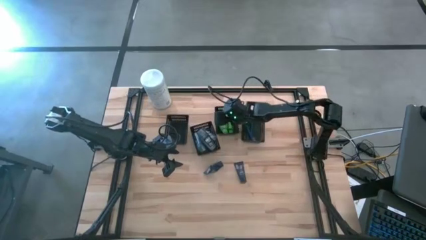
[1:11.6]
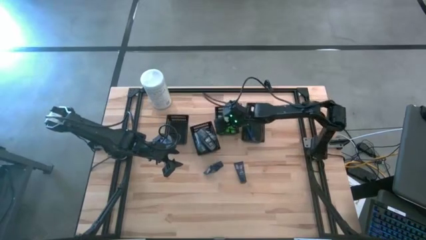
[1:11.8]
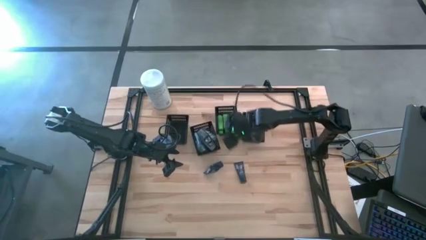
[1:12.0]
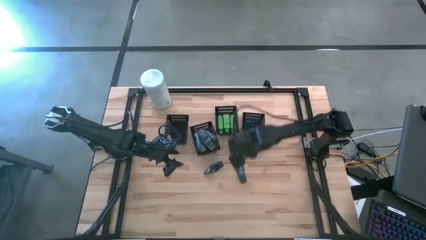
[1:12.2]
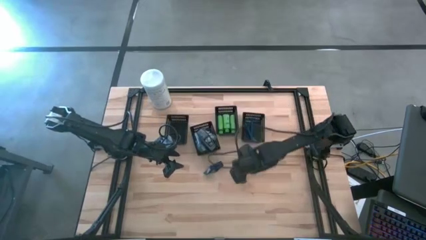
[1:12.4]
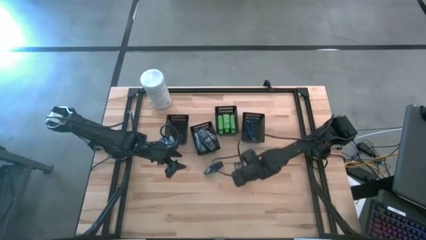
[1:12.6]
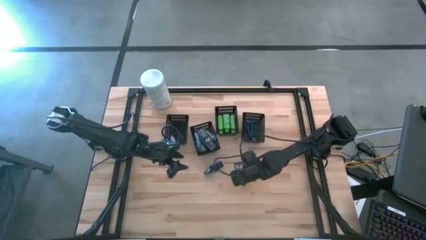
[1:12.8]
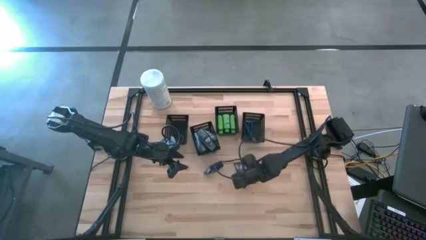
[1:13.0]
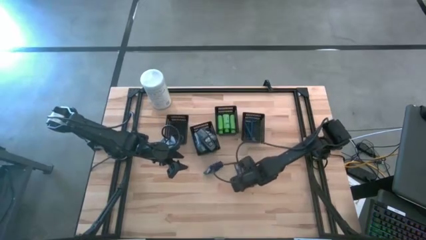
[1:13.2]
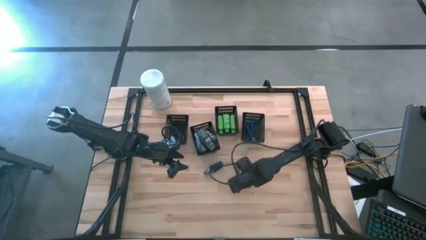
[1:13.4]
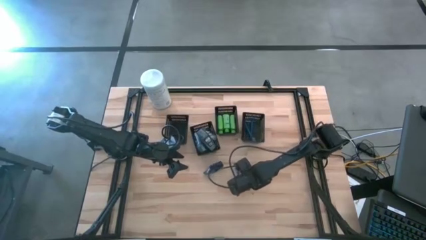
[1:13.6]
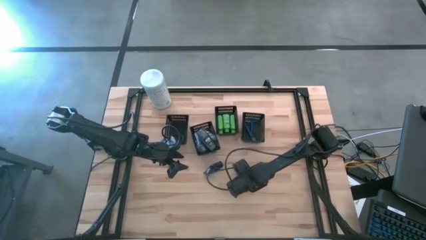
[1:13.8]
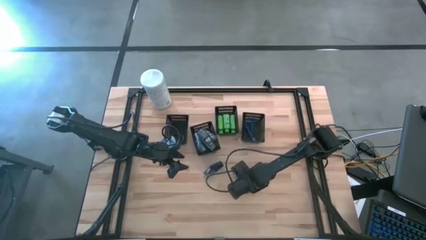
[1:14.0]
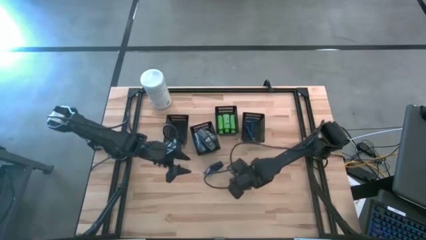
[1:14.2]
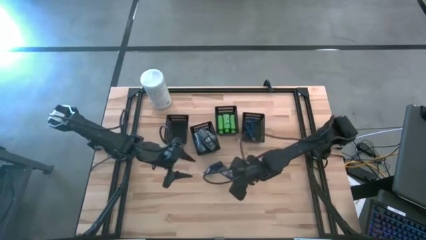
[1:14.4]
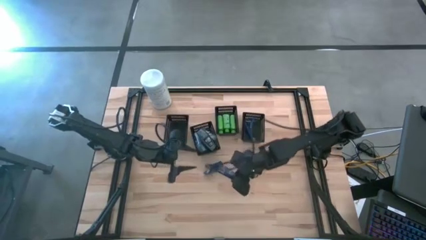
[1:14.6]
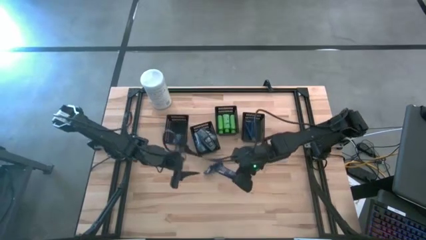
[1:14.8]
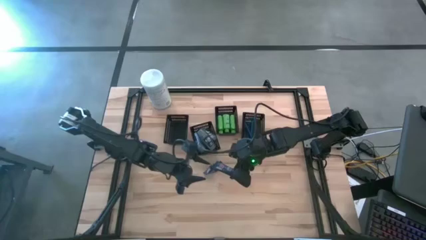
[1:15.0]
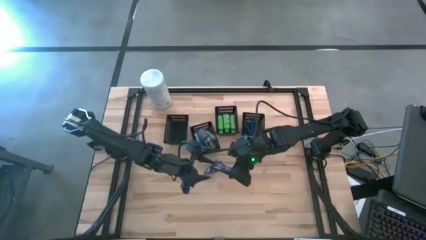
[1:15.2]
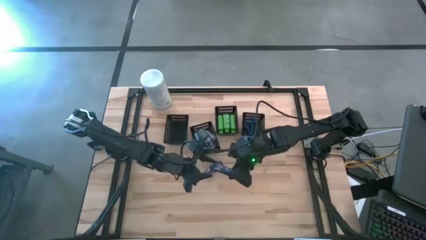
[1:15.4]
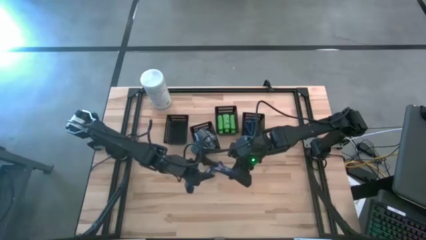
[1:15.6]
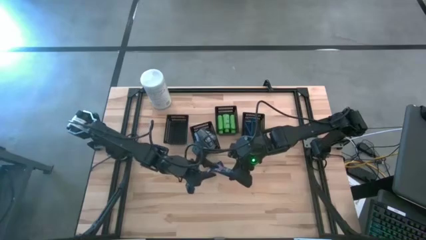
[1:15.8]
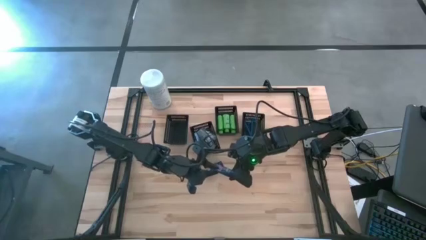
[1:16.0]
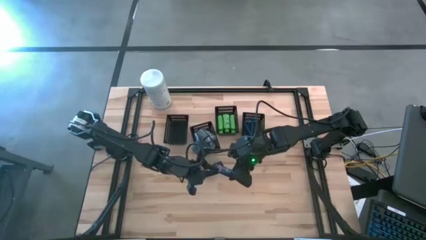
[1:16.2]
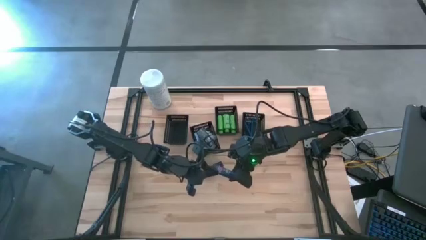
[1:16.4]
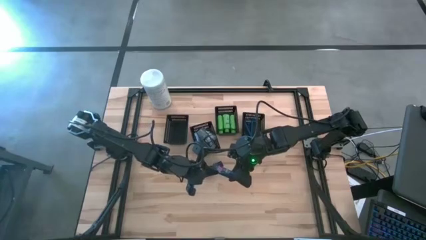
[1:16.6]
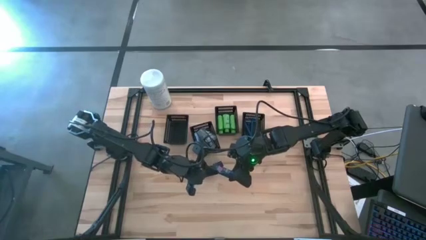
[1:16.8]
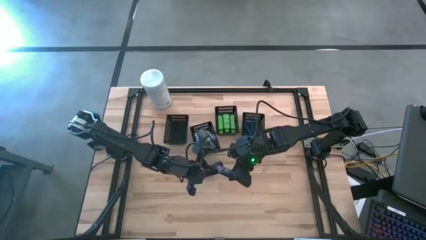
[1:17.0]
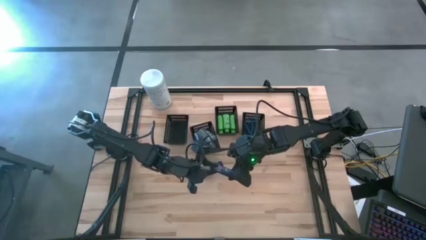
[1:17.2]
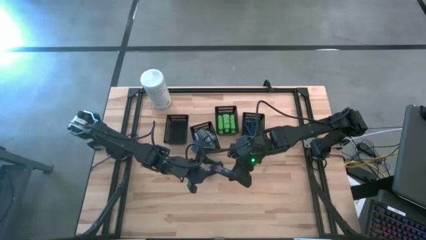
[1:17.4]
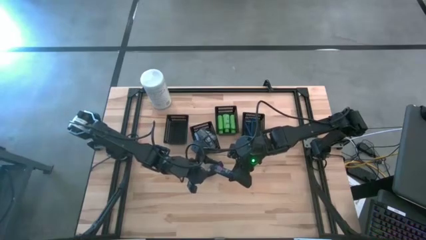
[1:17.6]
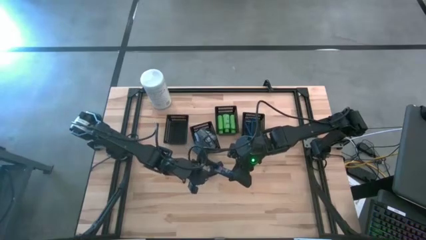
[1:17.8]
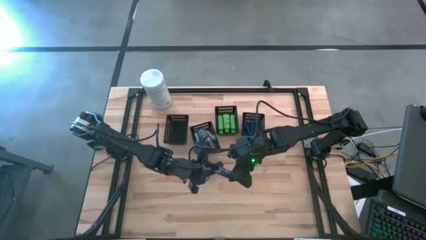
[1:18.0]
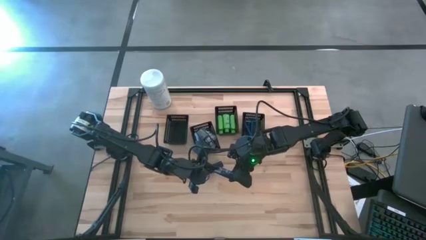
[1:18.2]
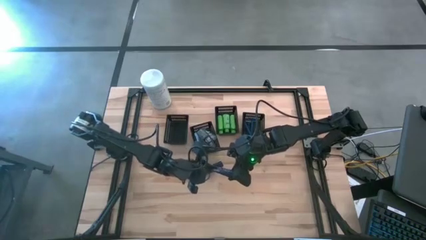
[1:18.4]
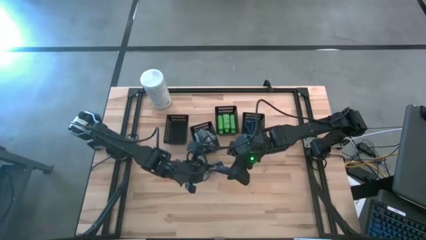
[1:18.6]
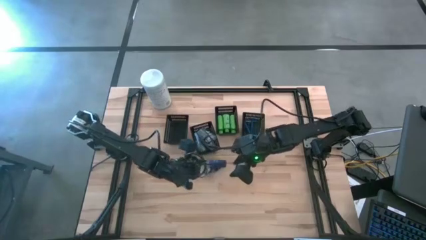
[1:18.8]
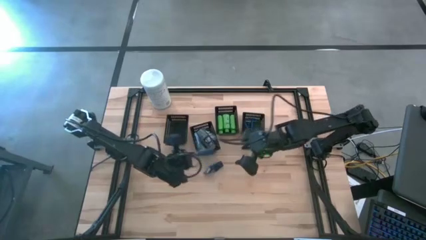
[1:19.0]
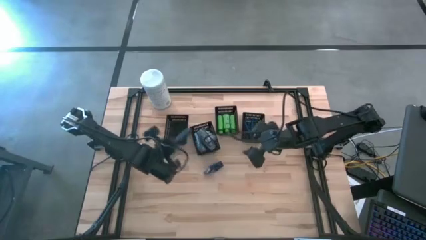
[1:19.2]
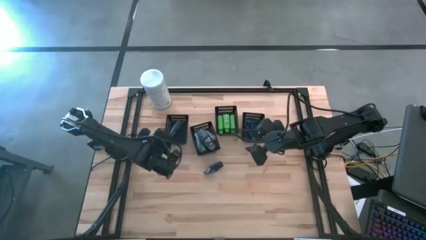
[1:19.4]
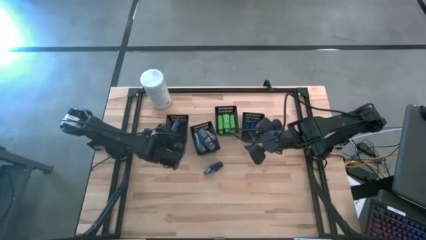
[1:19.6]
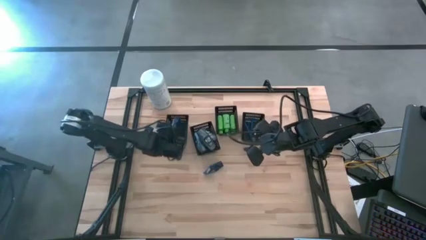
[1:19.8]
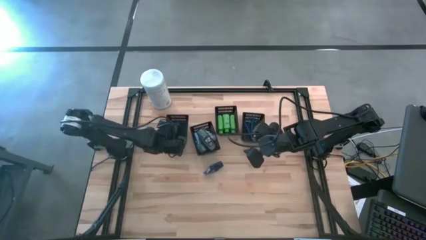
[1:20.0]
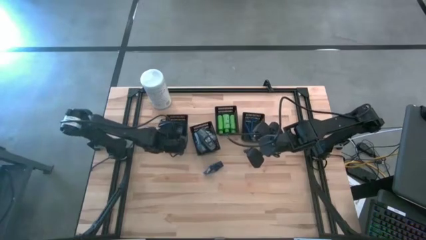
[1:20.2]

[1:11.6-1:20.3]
Task: Pick & Place Travel size toiletries
Put the right shaving cream into the far left bin

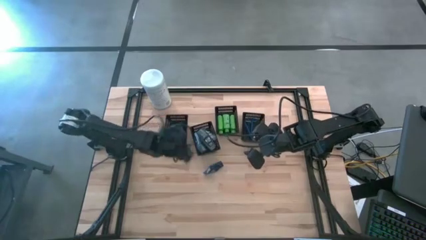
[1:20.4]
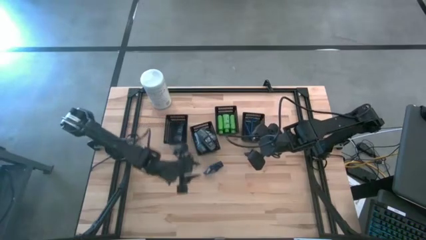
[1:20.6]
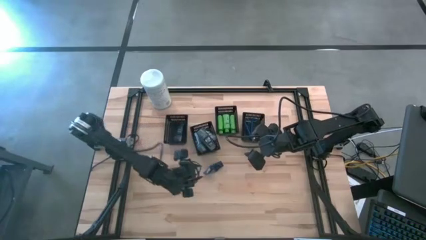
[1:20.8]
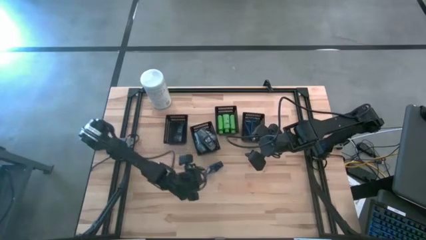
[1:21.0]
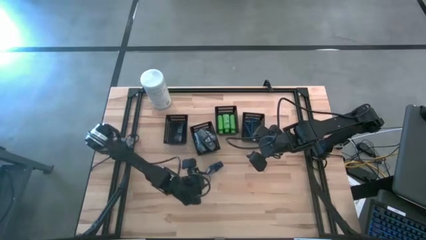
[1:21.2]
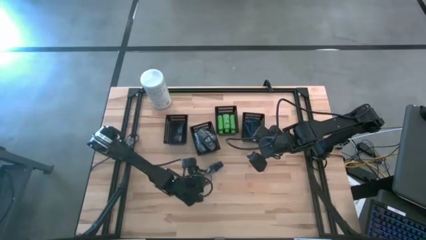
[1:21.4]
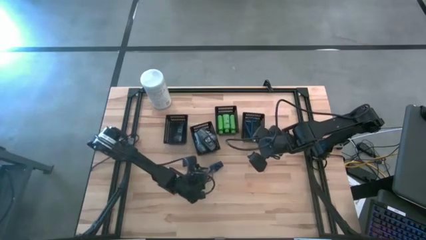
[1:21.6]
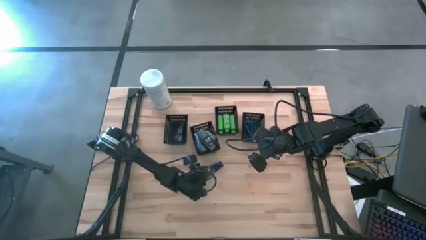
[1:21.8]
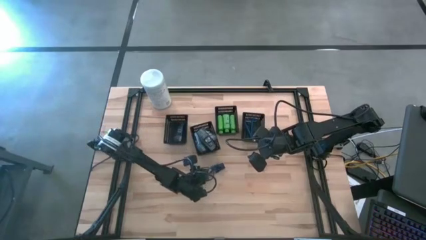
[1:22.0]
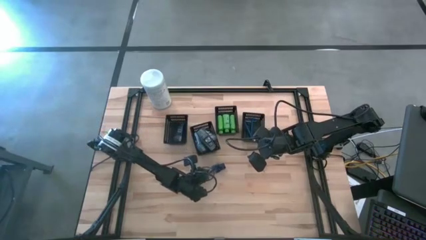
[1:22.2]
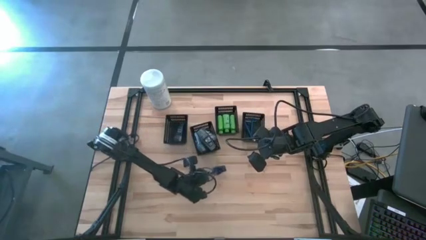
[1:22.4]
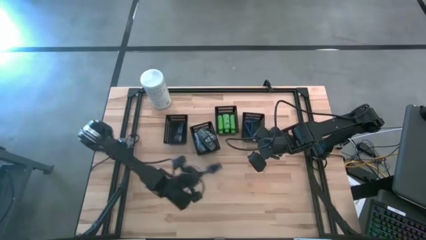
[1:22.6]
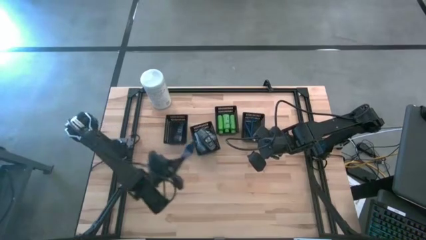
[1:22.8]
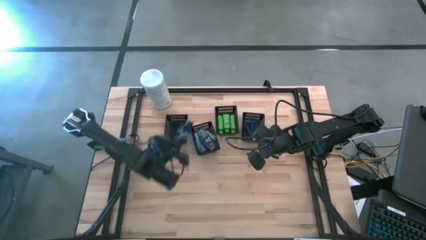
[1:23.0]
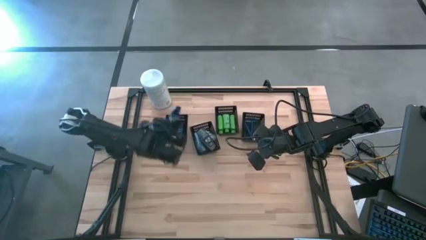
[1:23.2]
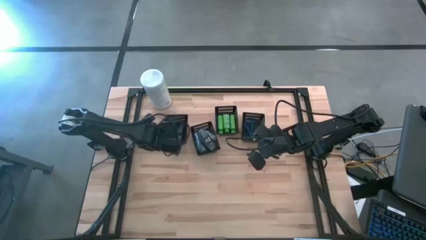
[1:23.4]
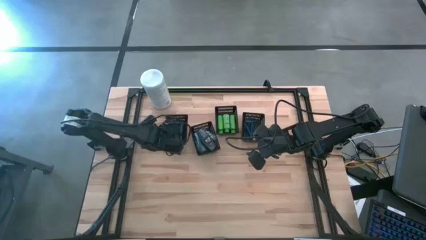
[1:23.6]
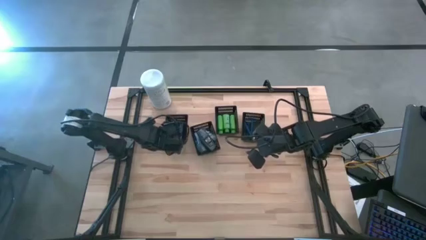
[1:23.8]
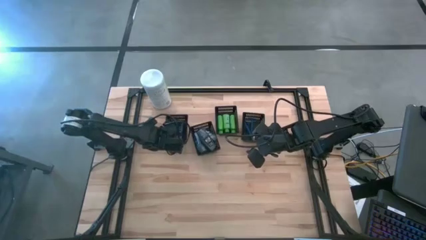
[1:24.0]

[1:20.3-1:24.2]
Put the shaving cream into the left bin

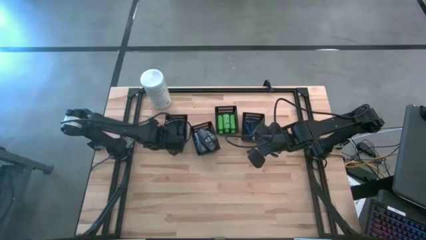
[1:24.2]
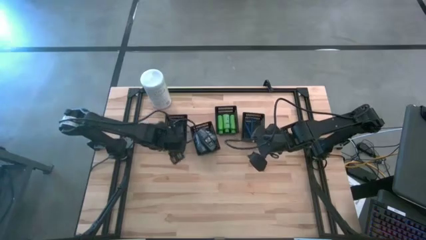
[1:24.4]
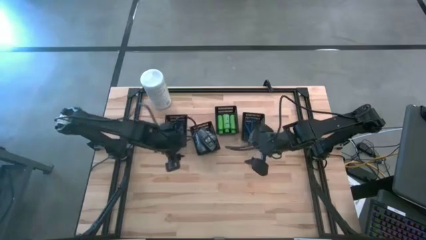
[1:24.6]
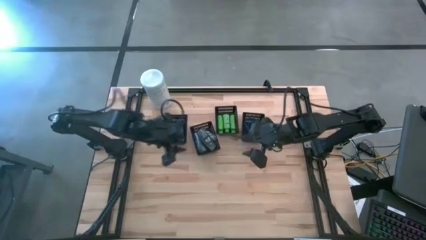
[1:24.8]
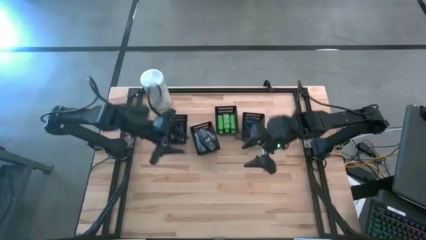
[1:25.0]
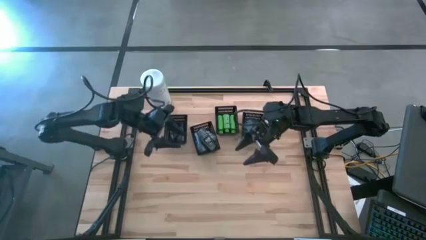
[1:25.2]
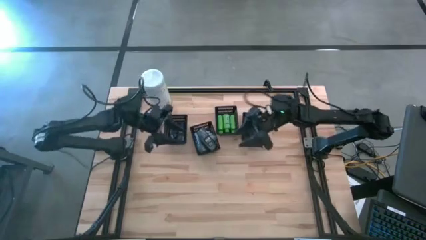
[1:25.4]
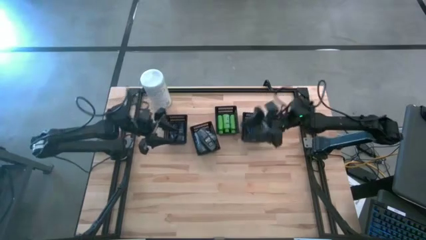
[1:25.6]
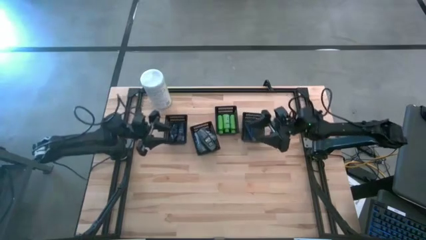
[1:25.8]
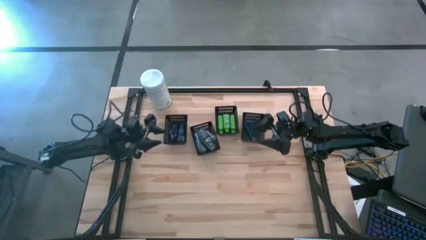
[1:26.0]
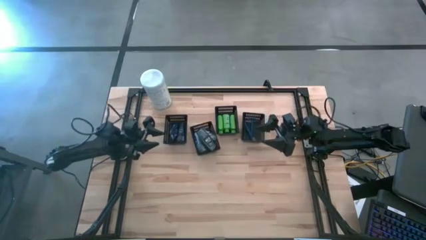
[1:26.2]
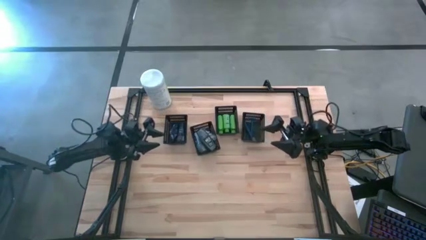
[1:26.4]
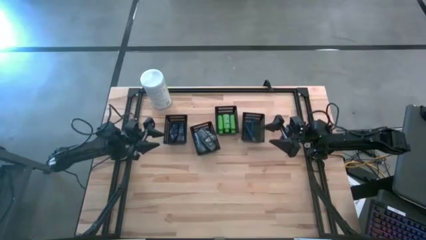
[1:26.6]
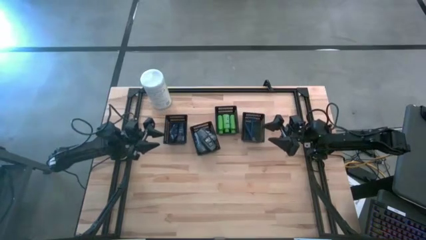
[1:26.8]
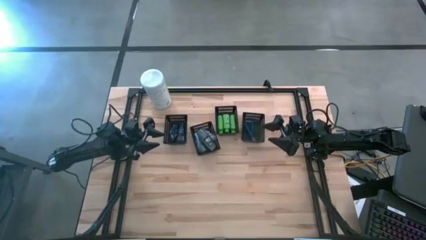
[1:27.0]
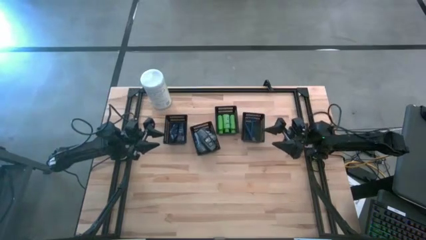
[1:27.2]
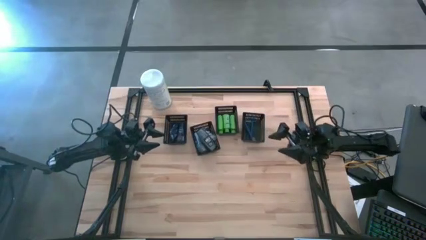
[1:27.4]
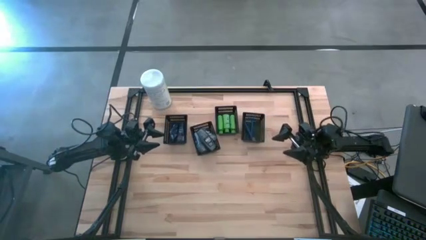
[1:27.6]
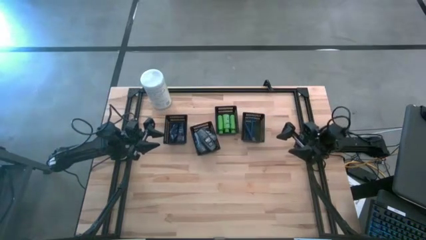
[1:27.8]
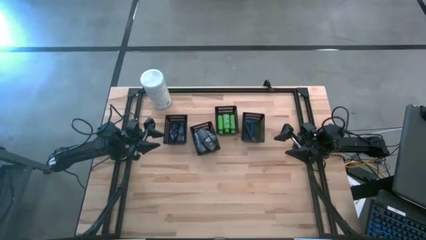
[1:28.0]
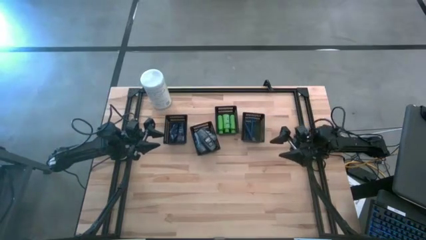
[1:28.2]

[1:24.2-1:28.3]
Return To Home Position
